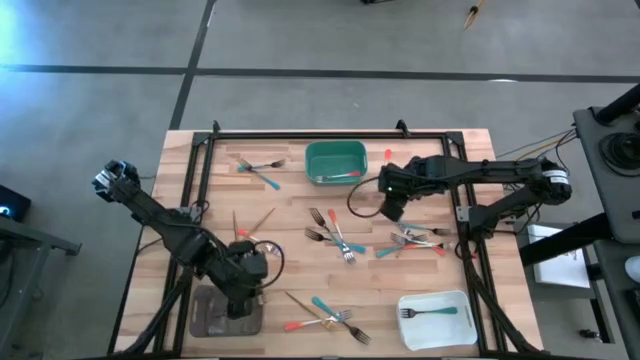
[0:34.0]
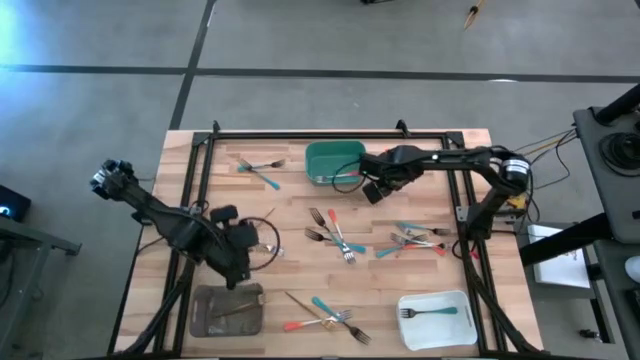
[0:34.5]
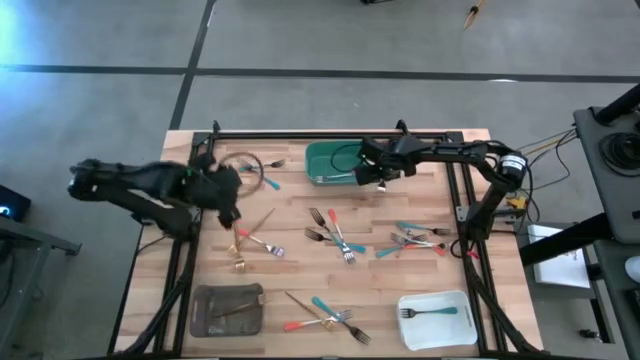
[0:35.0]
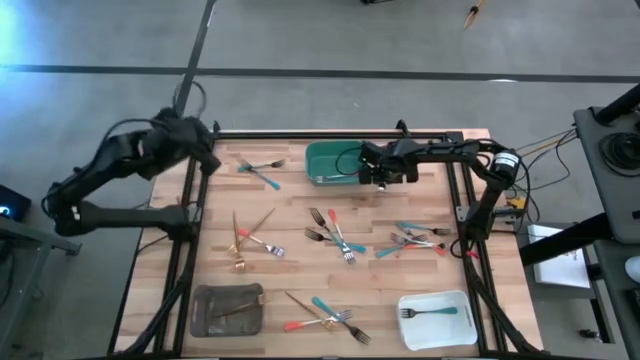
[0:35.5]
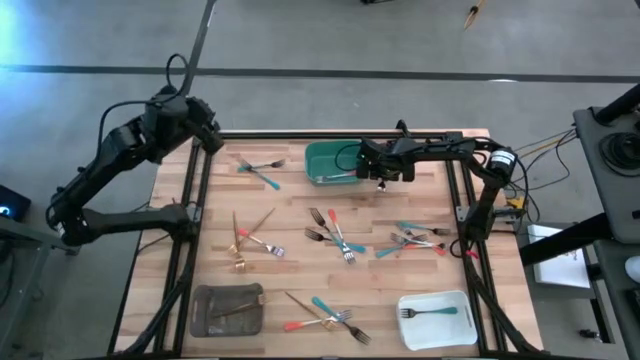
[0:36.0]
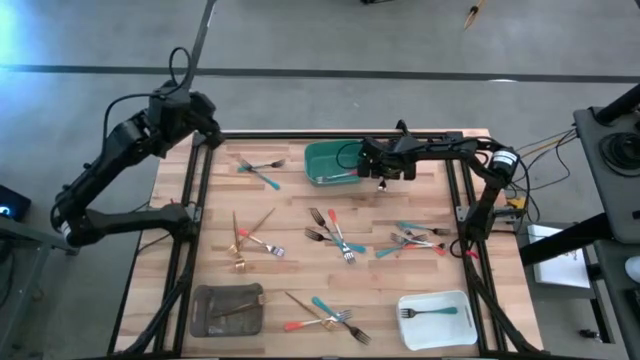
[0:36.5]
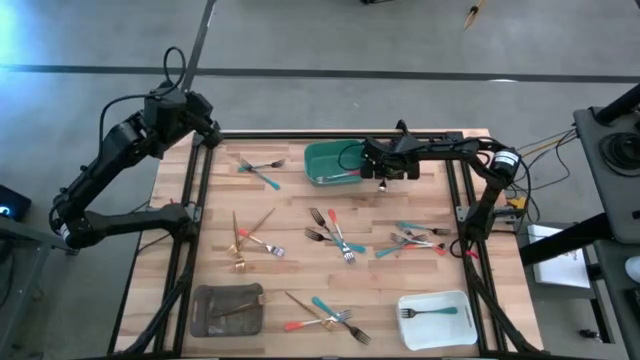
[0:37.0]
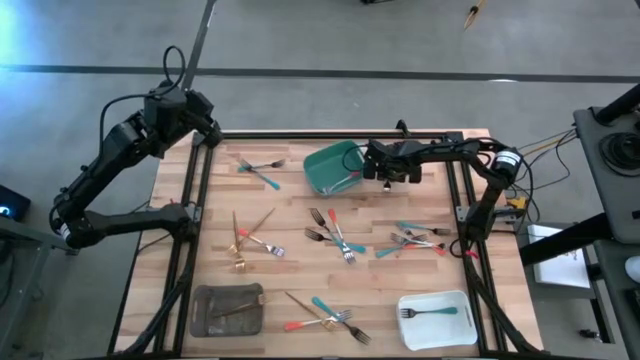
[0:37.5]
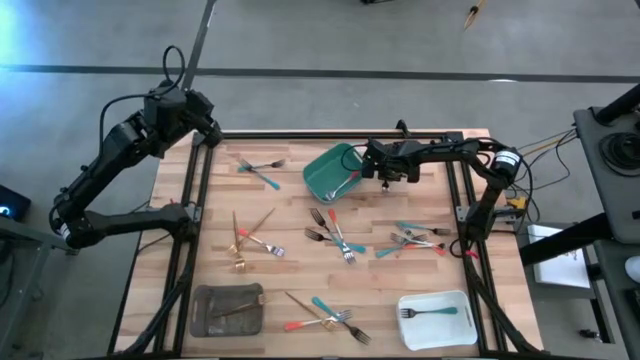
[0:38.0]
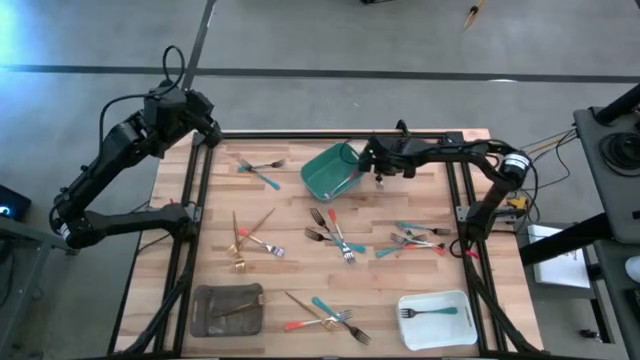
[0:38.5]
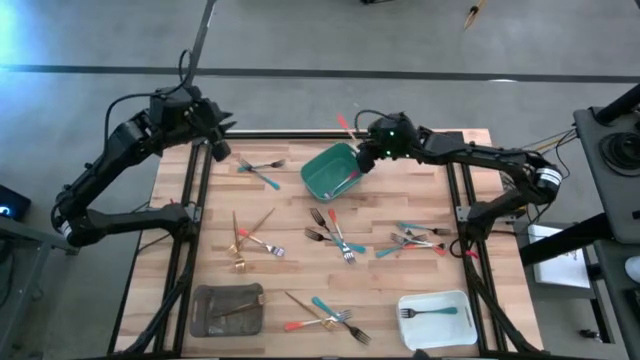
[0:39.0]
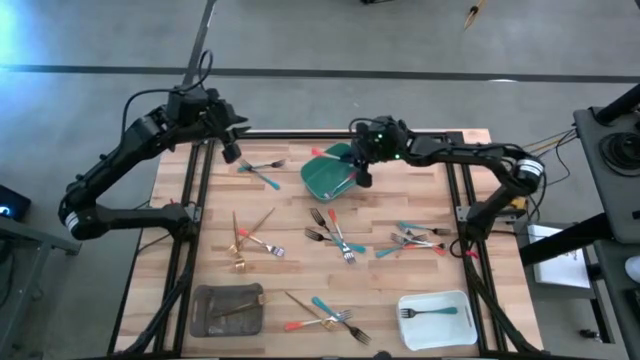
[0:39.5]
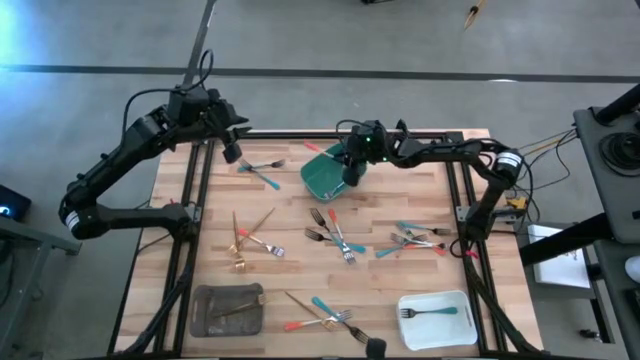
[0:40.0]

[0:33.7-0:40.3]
Task: Sort silverware by color (type)
Put the orange fork into the green bin

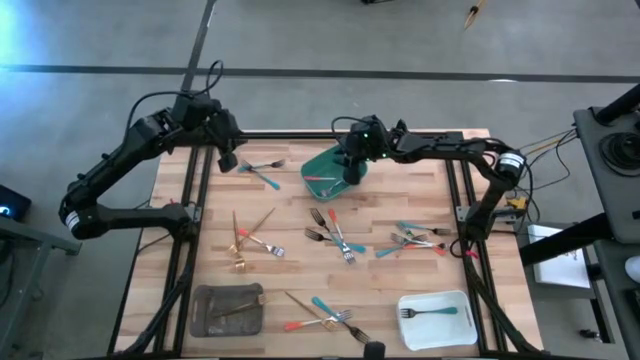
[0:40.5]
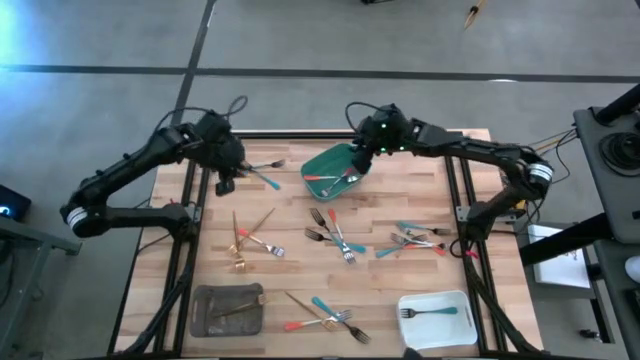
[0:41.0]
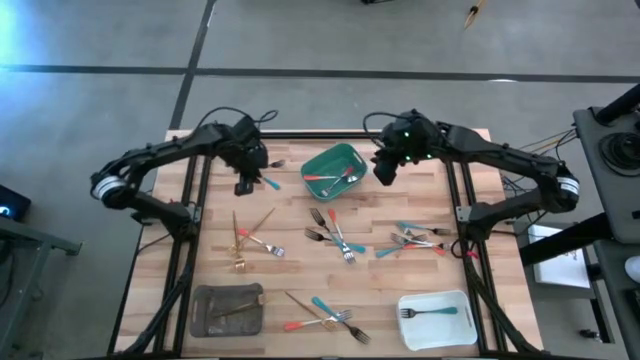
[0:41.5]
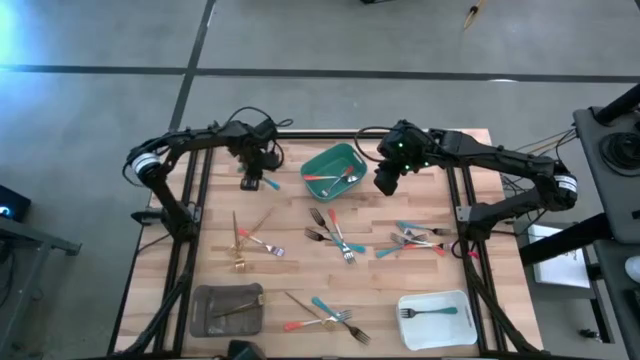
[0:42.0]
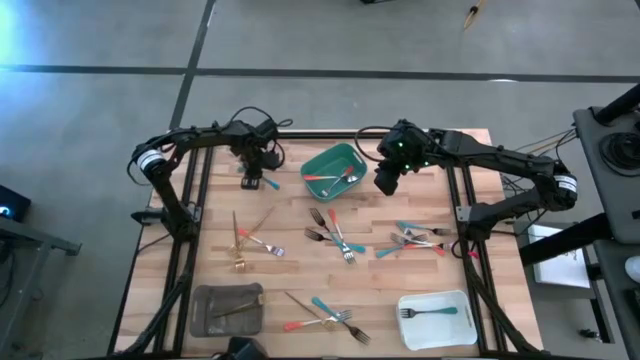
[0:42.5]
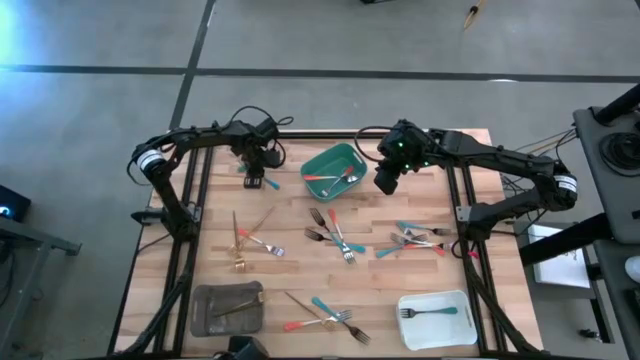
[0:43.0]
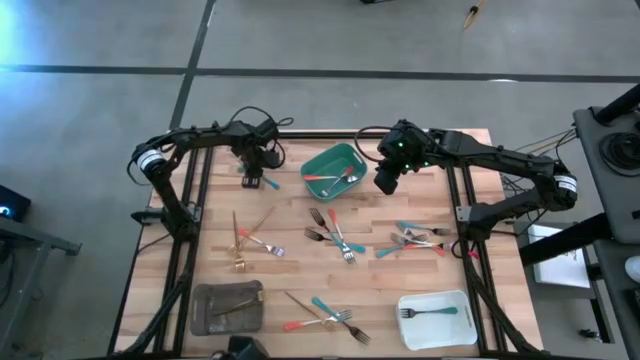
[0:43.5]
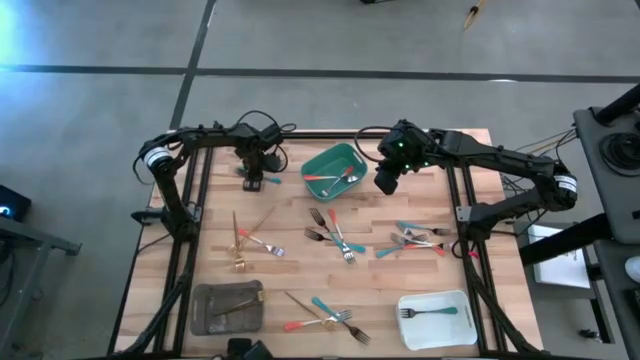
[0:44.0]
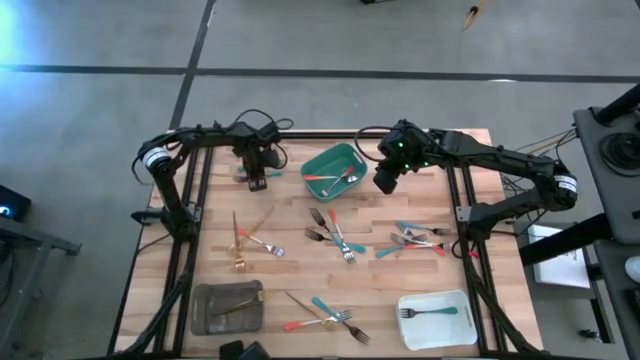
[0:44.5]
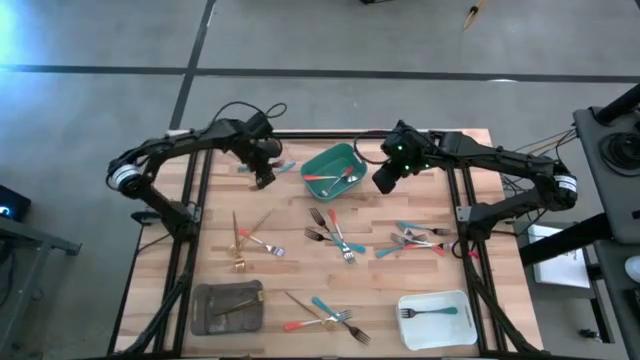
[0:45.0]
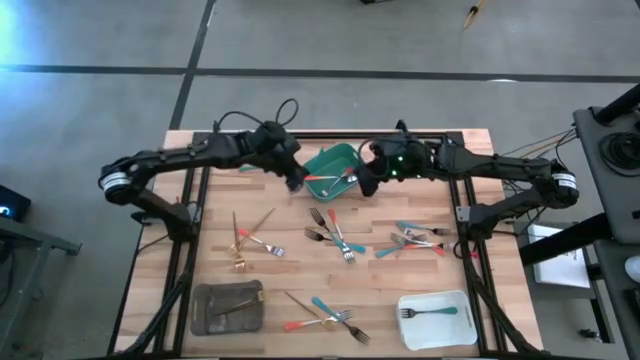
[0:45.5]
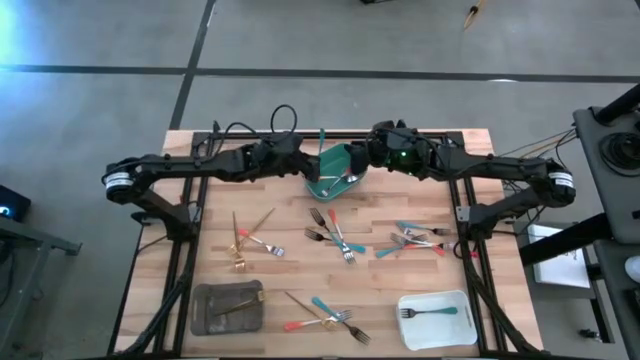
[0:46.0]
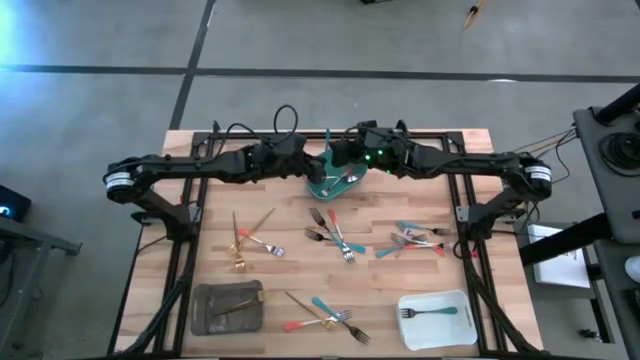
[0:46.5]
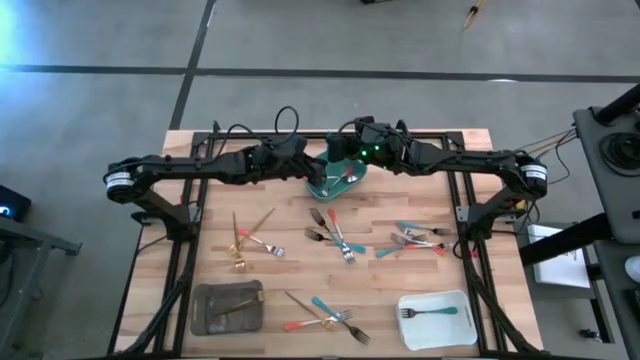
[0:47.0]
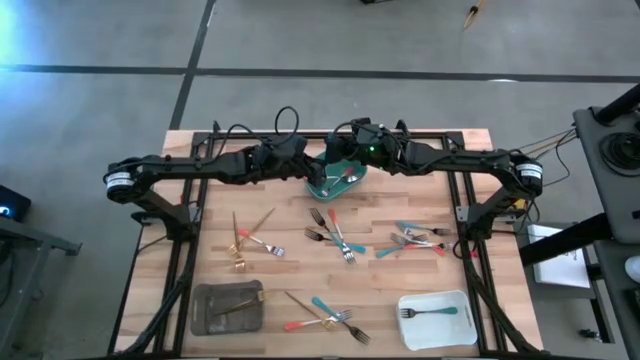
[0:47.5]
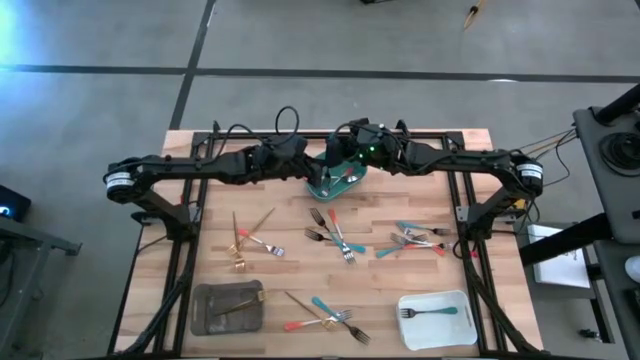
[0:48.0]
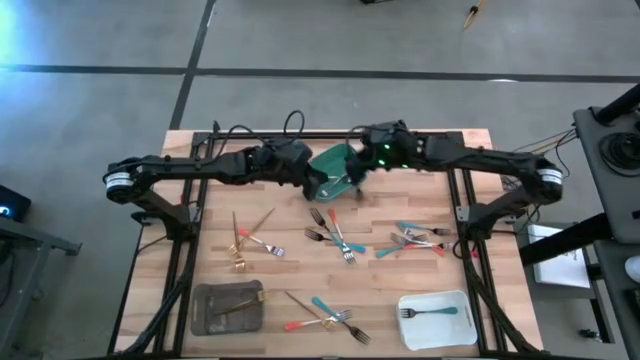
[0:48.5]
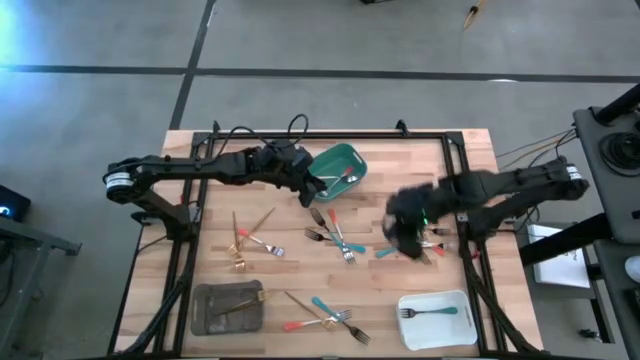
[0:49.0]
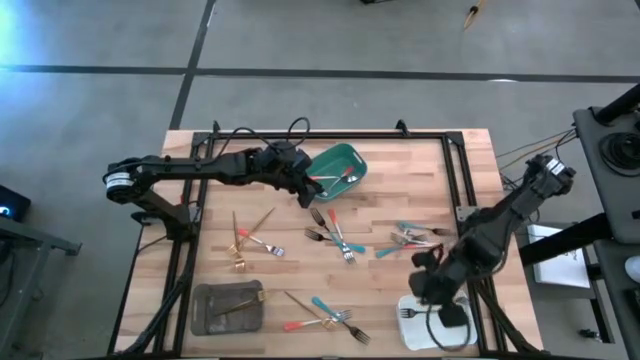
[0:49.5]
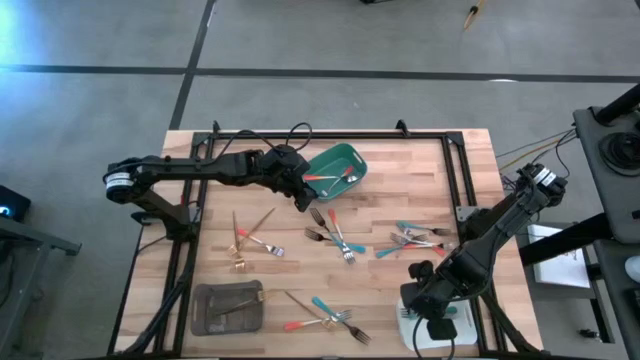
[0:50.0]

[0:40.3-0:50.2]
Put the blue fork into the white bin

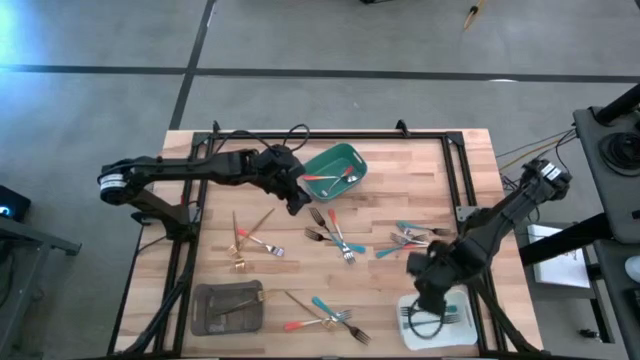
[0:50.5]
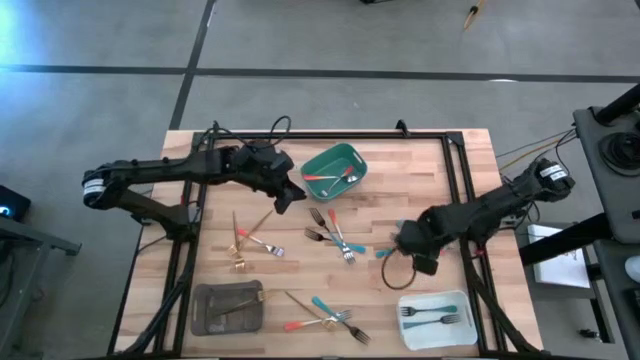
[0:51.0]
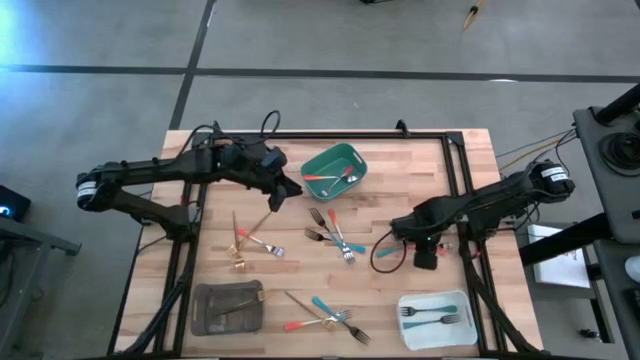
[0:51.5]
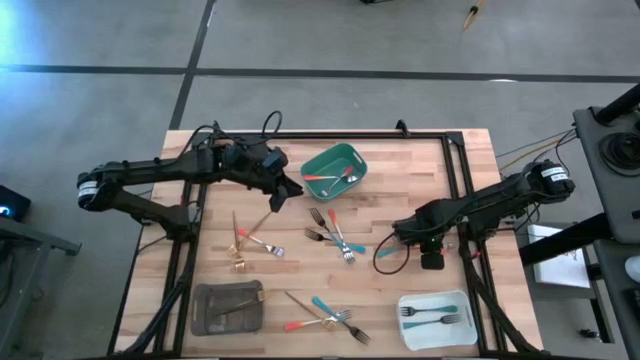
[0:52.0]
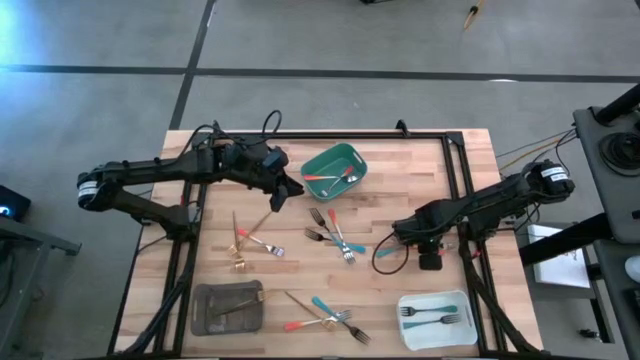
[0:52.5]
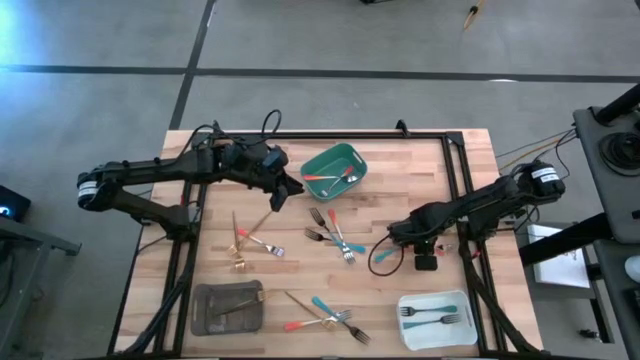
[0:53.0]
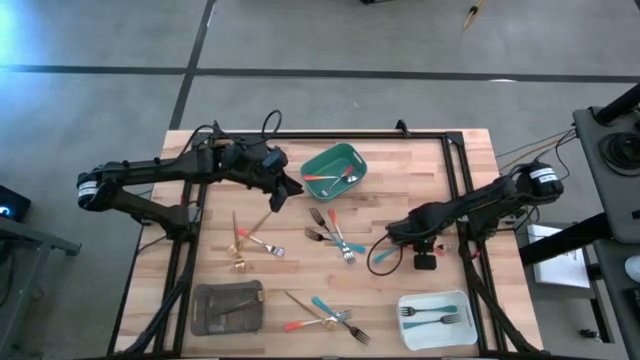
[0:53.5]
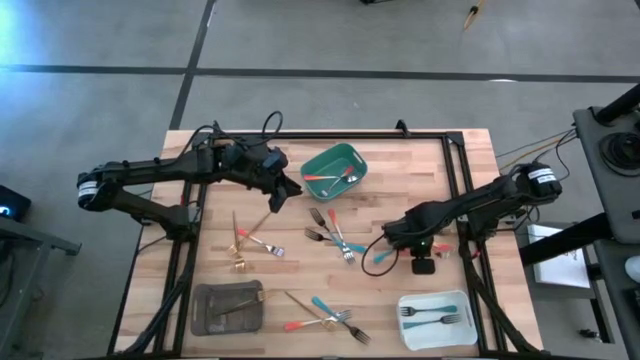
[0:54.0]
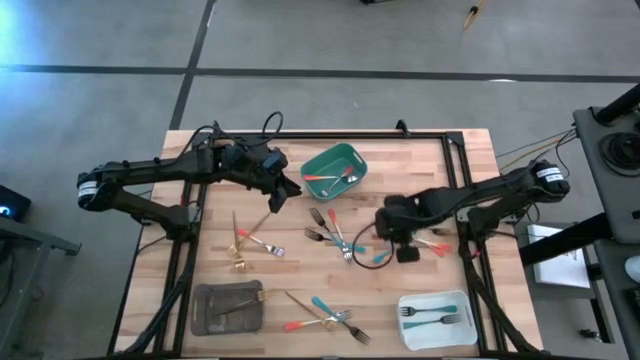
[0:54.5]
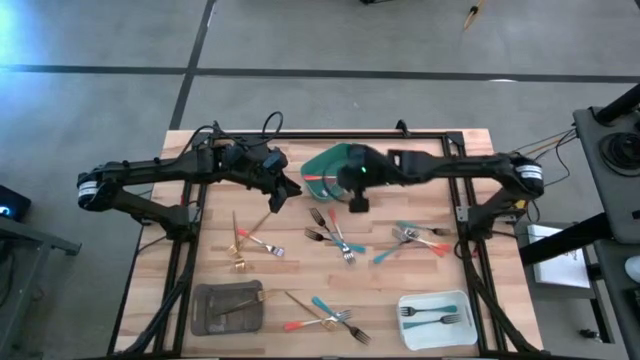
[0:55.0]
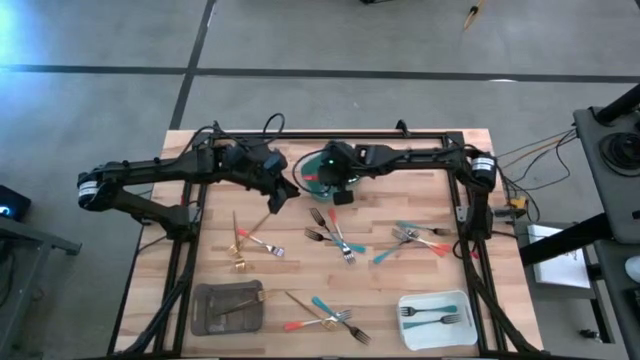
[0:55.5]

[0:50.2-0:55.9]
Put the orange fork into the green bin

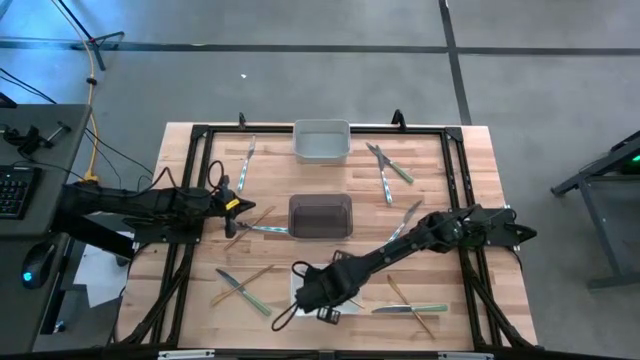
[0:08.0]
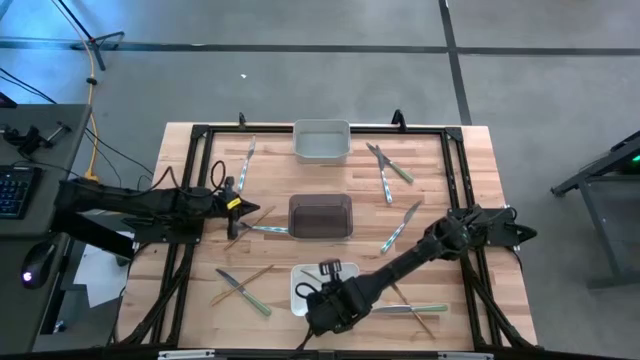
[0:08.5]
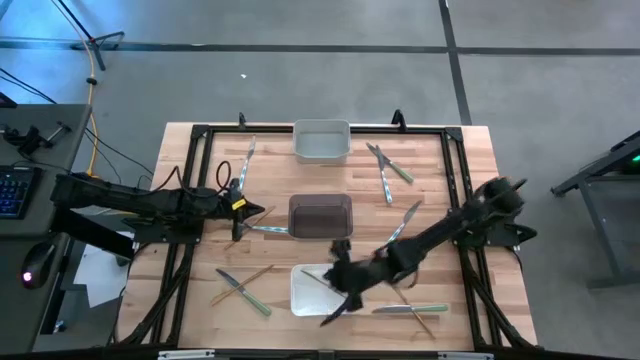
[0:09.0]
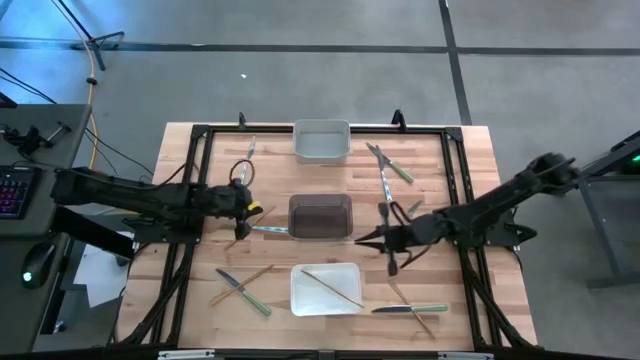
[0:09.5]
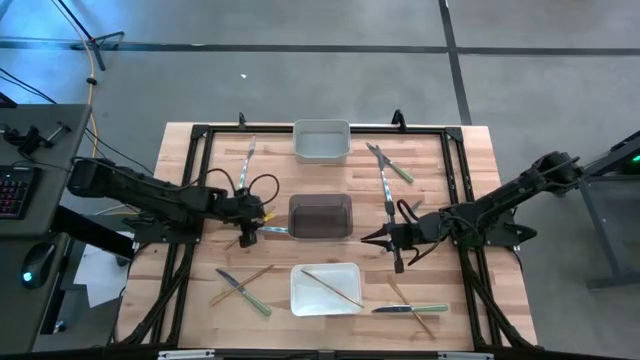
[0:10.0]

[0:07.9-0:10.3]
Task: Sort silverware by color (type)
Put the gold table knife into the white bin
